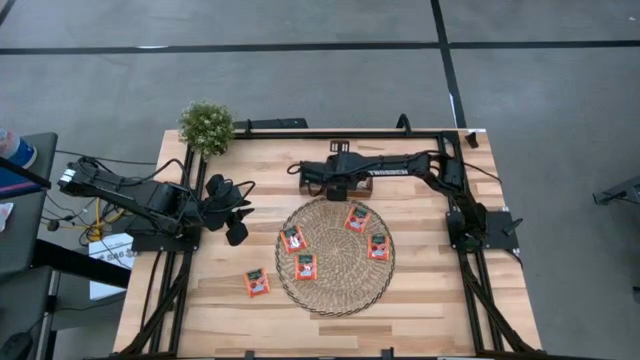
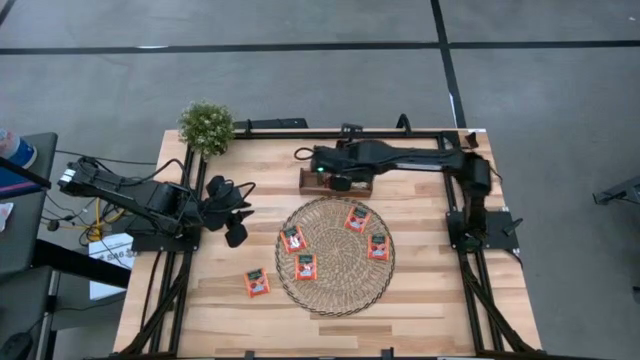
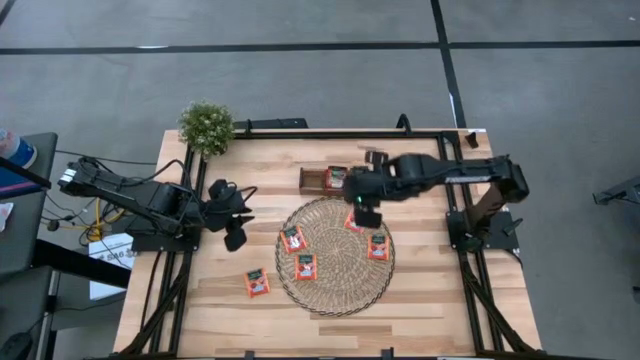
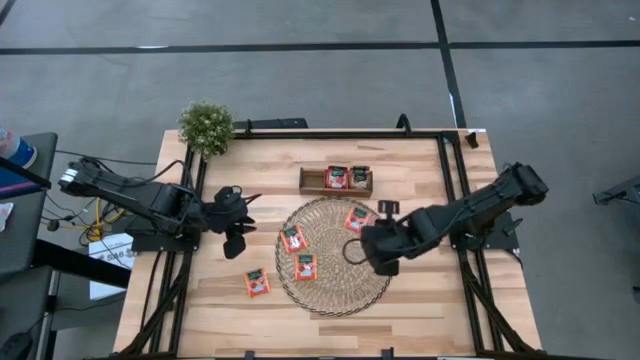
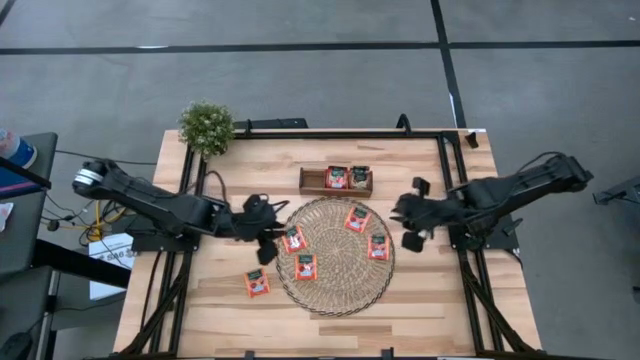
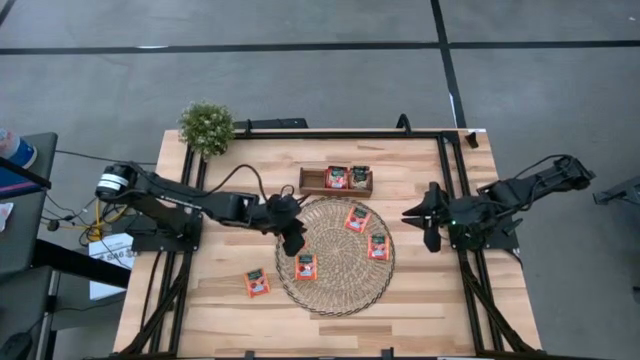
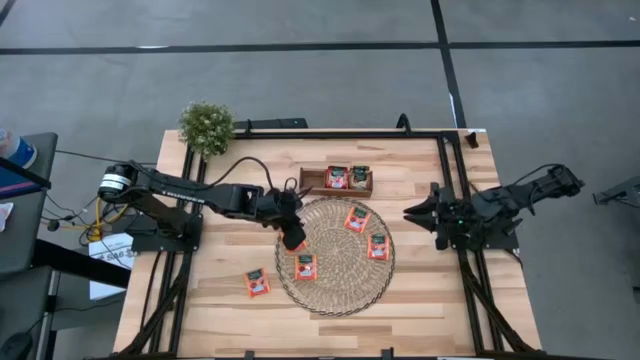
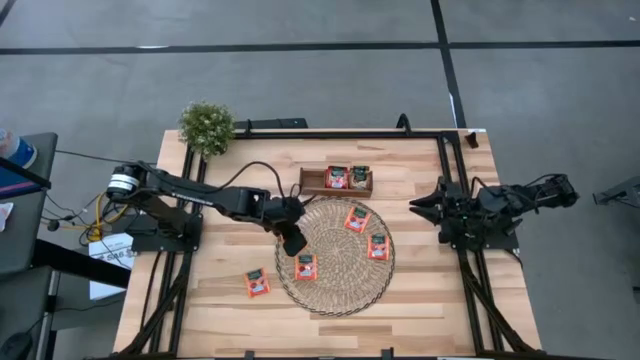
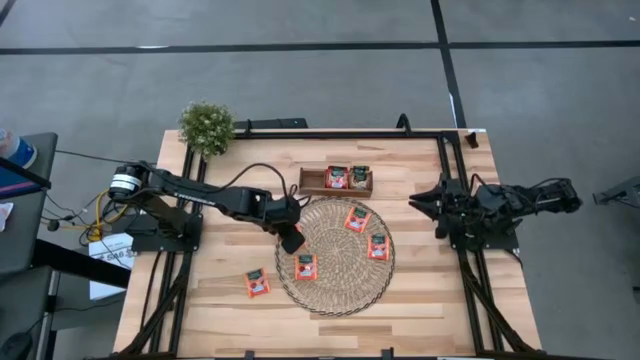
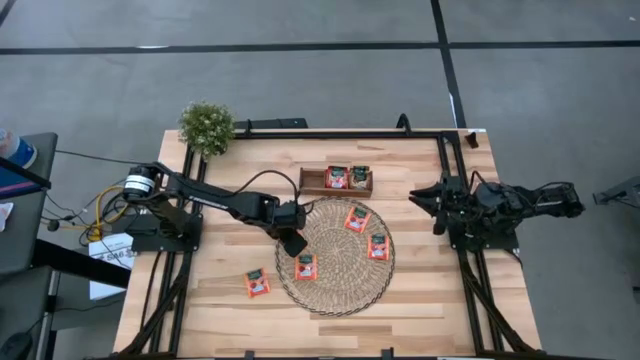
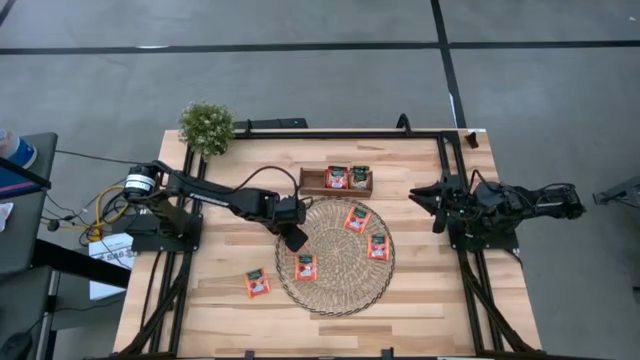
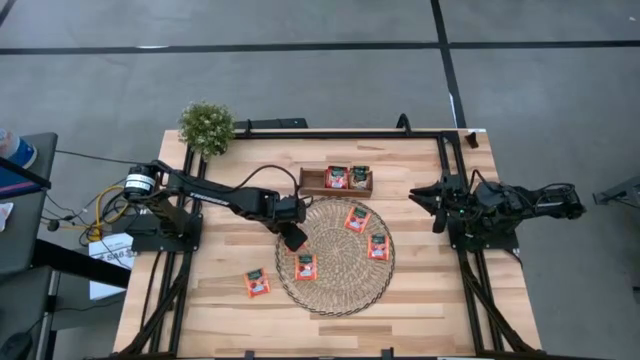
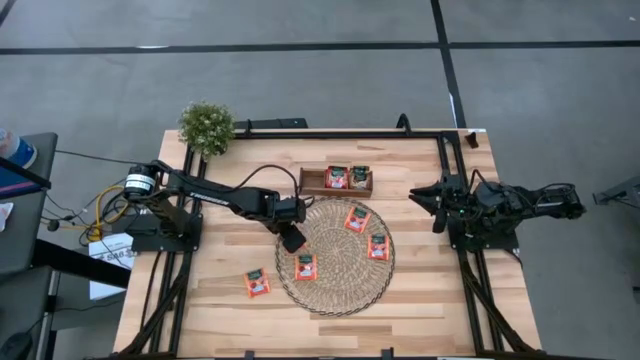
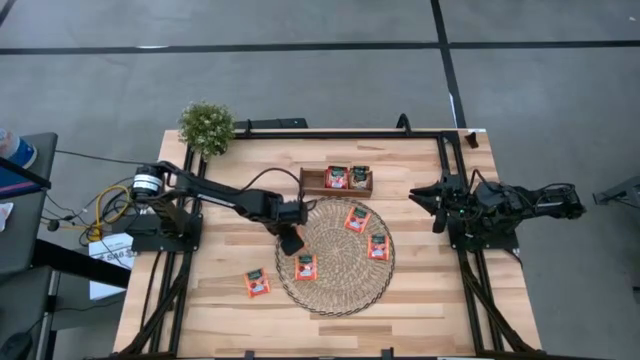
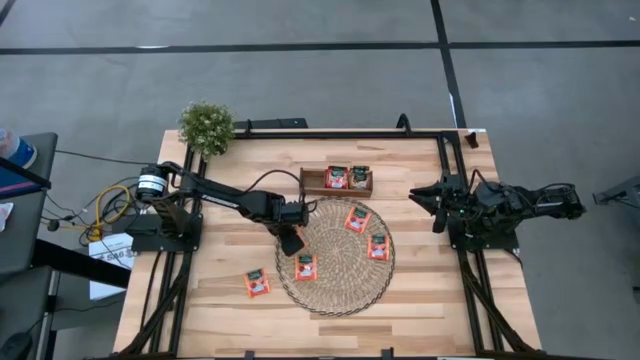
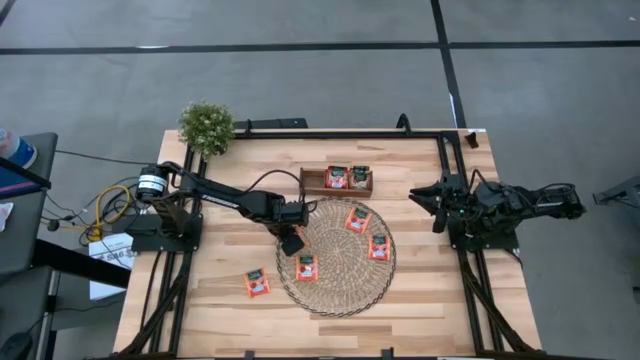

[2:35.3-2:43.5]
Task: Pick & Place Tea
Put the orange tea bag into the left section of the wooden organizer

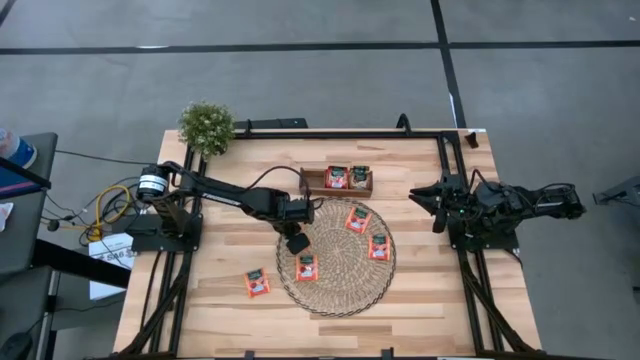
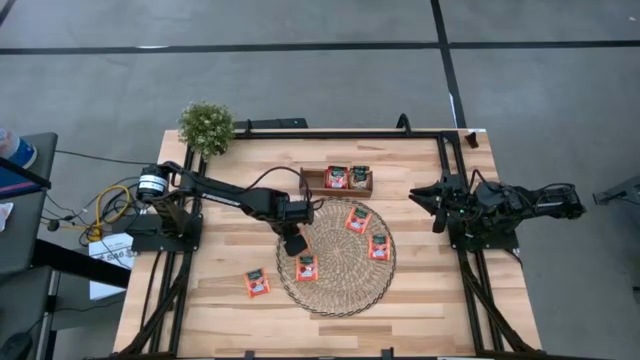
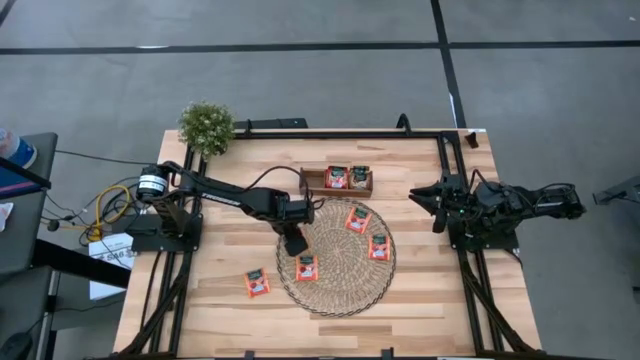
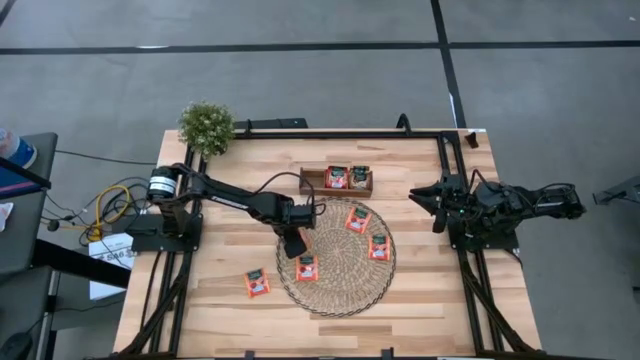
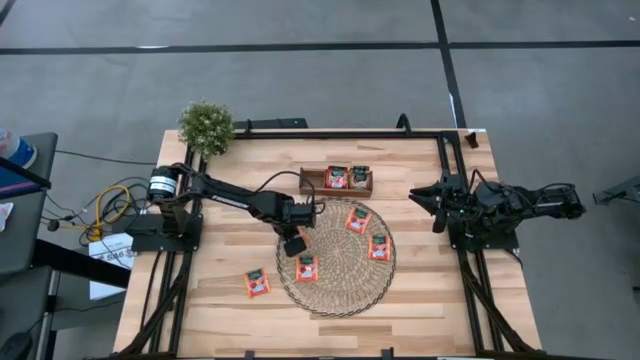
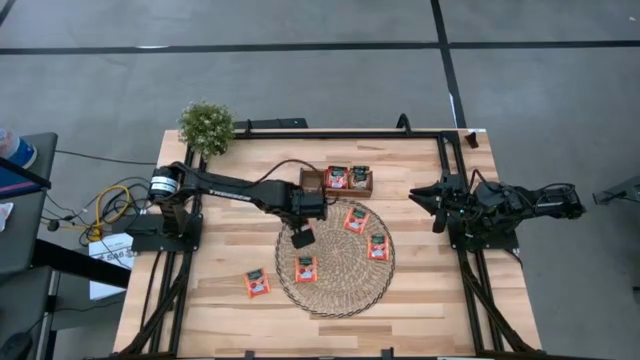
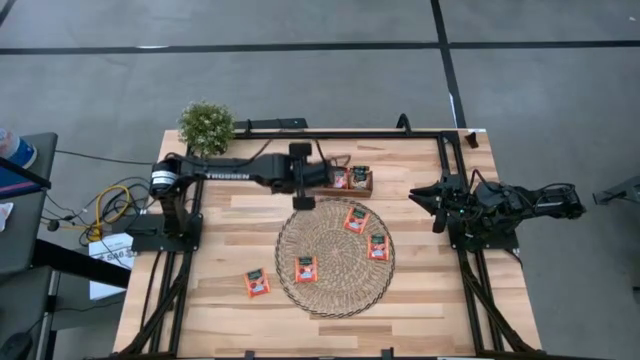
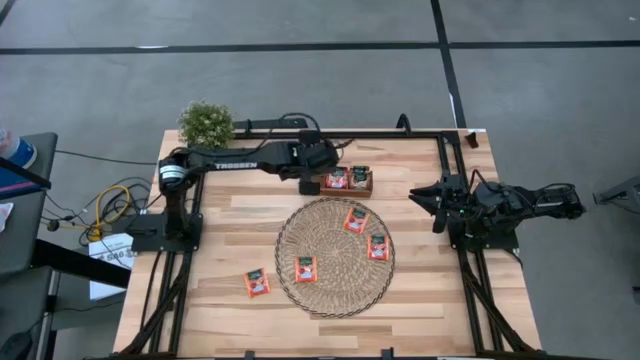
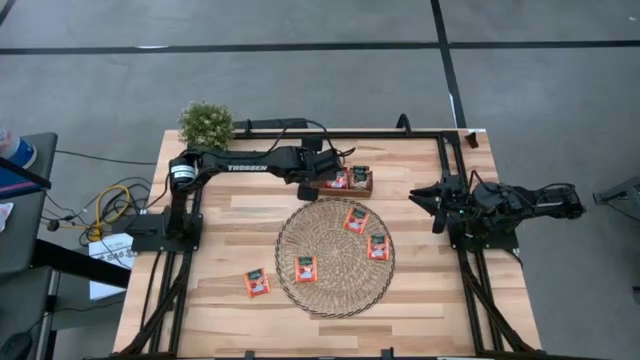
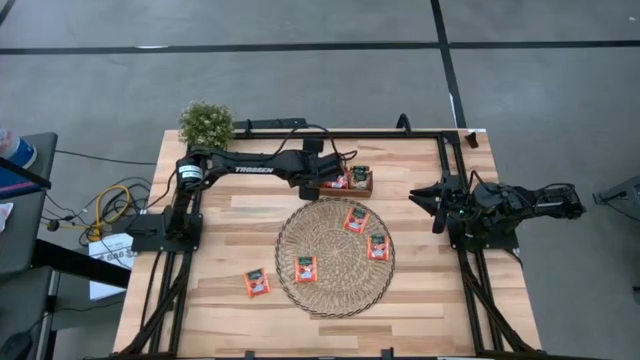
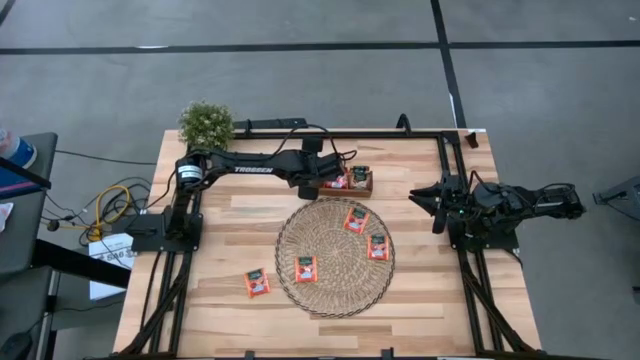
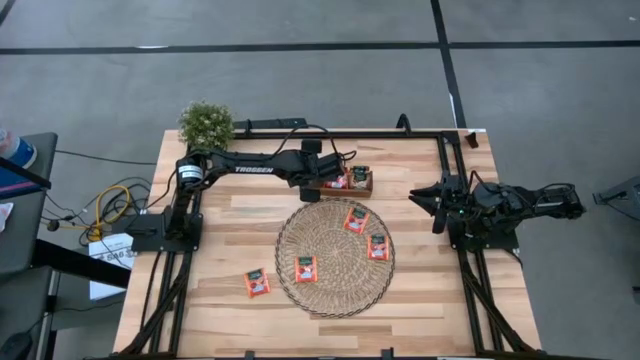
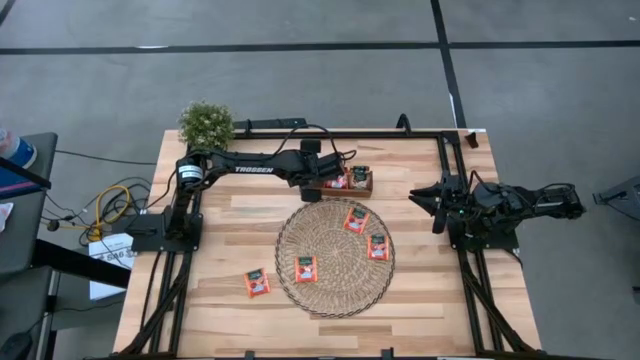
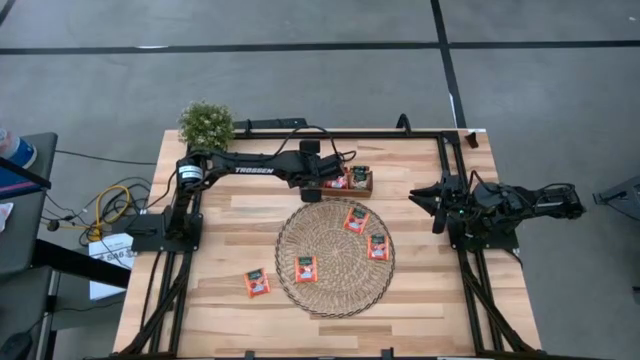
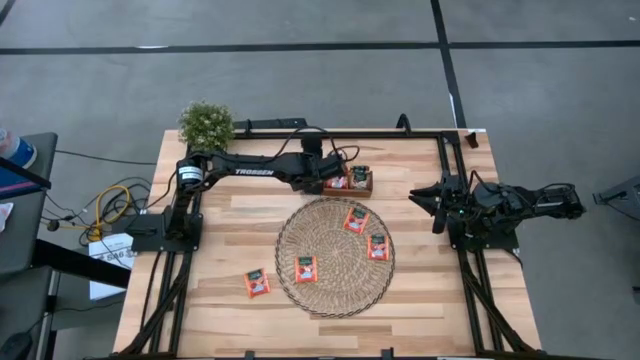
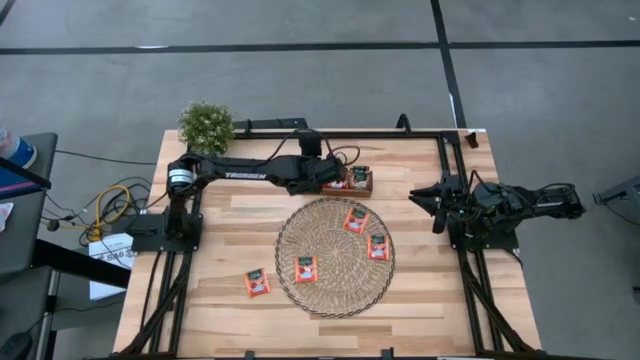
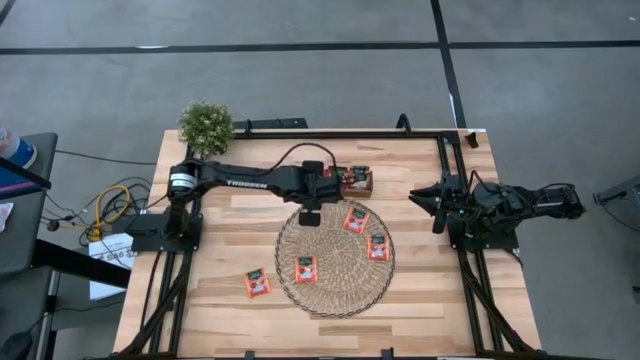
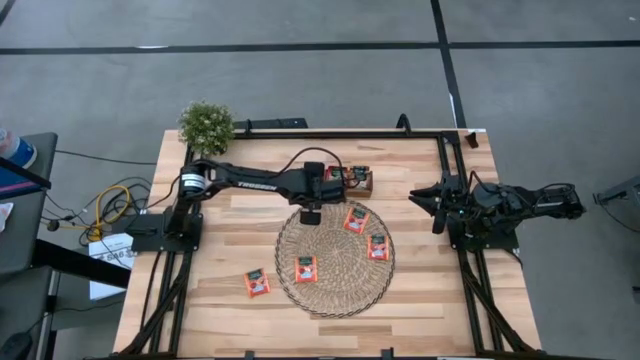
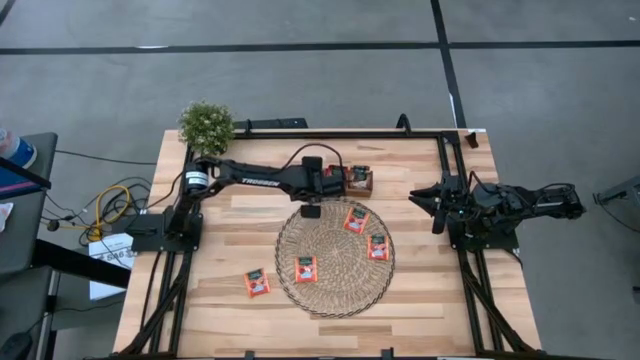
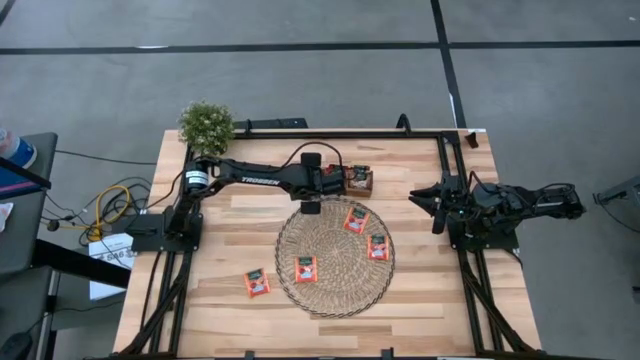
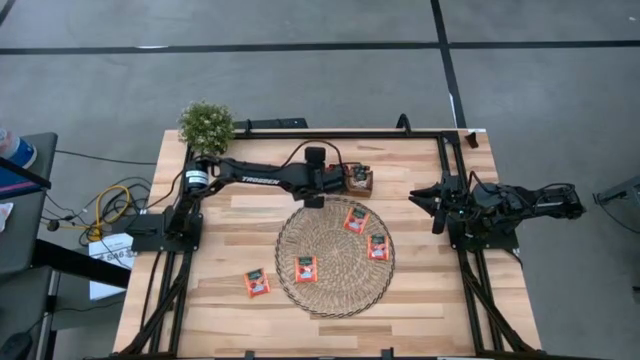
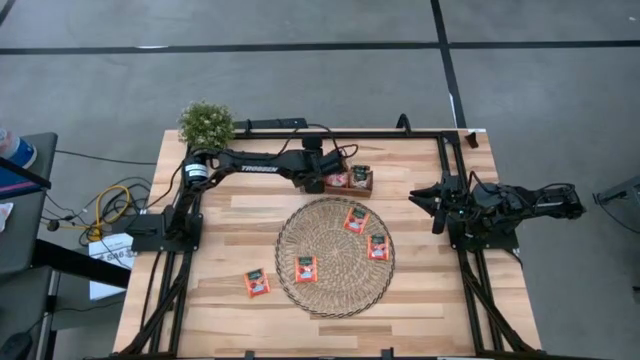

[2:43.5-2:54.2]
Put the orange tea bag into the left section of the wooden organizer

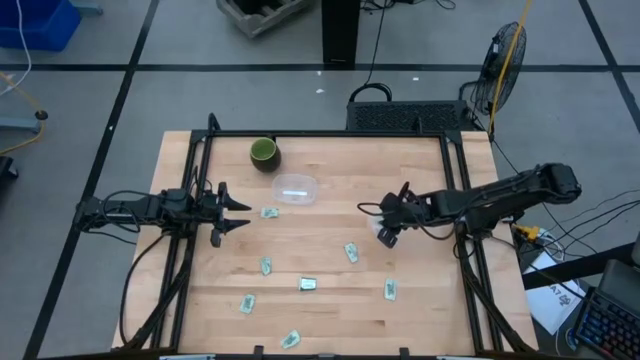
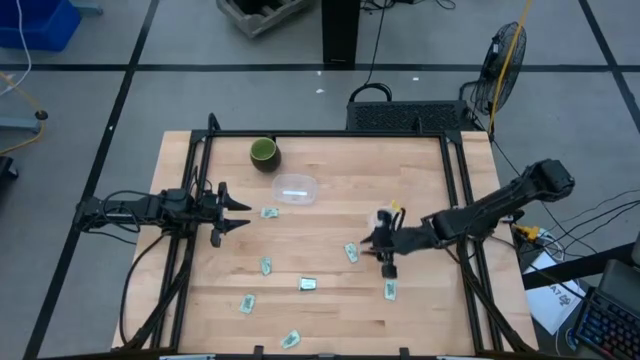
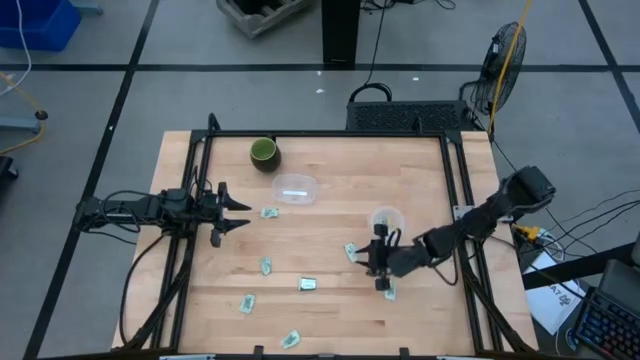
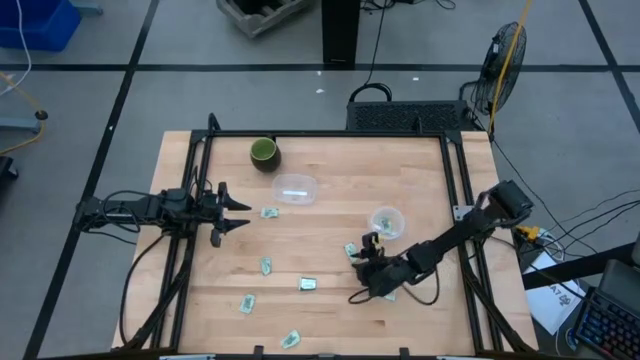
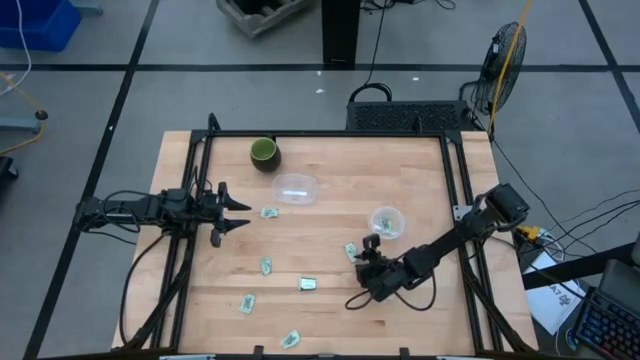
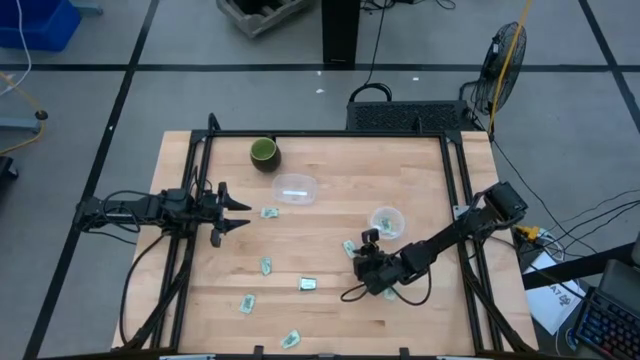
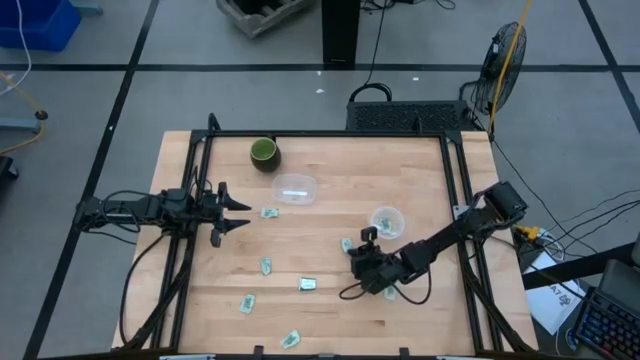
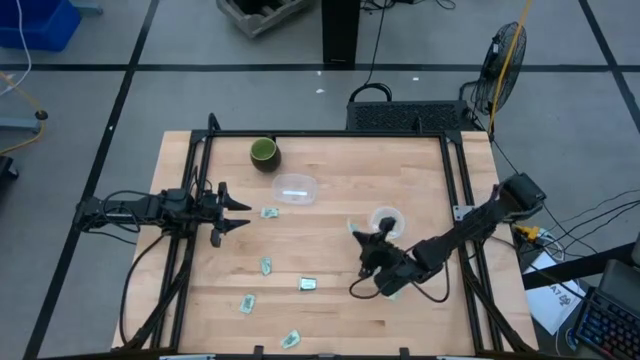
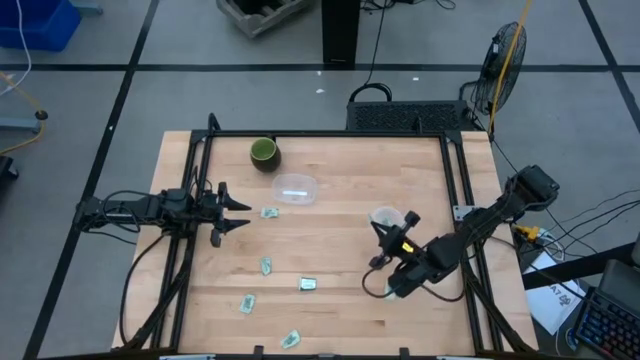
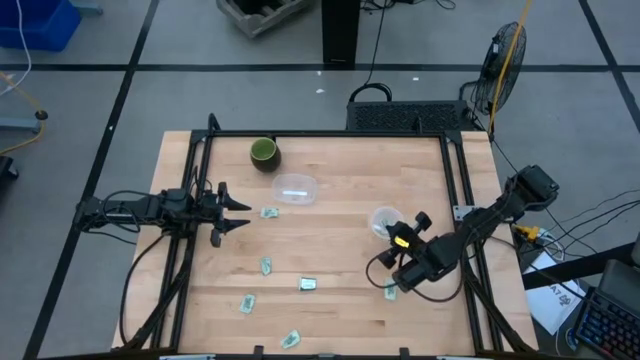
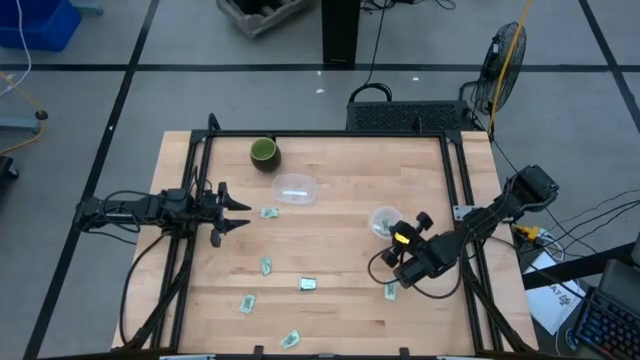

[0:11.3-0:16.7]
Task: Pick and place items into bin
Put the light green stevia packet into the right transparent bin
